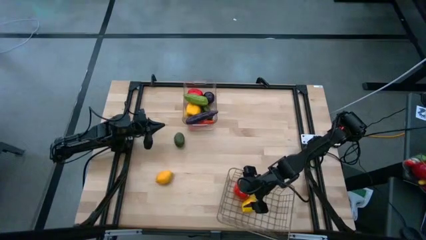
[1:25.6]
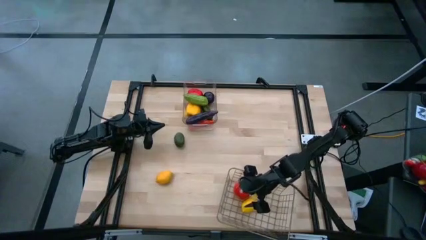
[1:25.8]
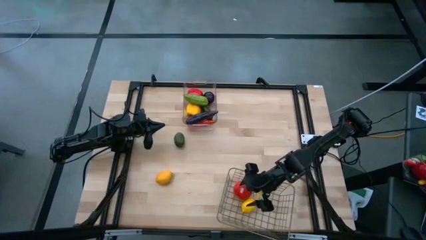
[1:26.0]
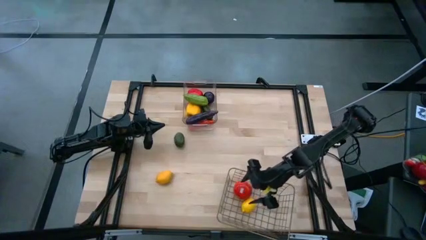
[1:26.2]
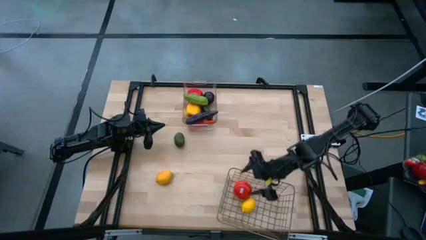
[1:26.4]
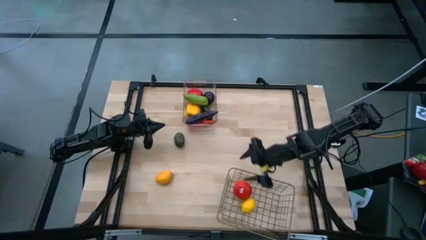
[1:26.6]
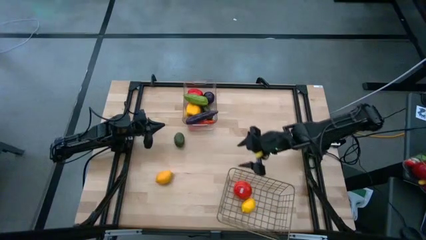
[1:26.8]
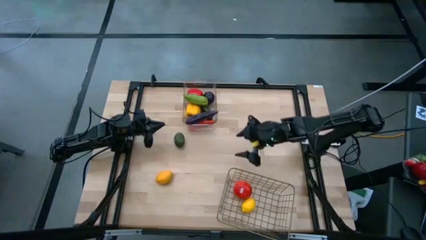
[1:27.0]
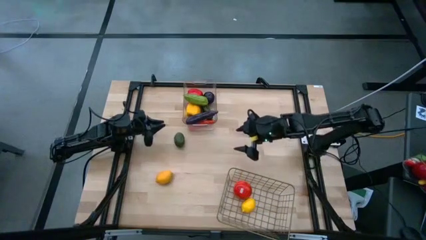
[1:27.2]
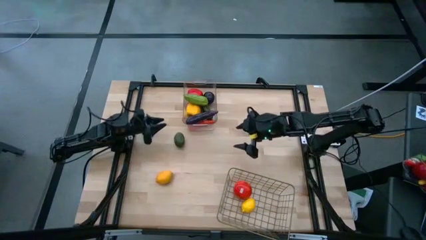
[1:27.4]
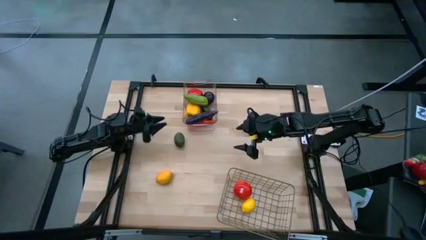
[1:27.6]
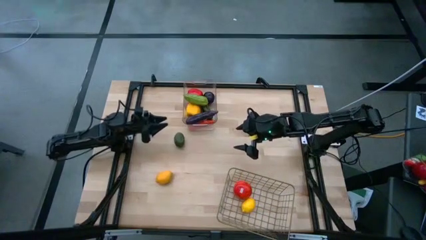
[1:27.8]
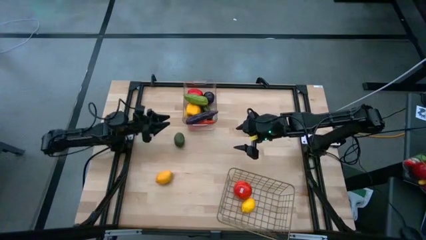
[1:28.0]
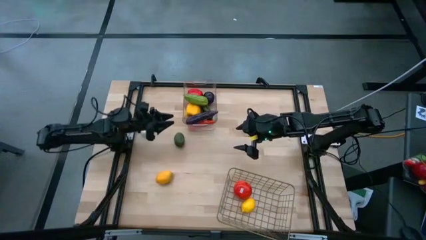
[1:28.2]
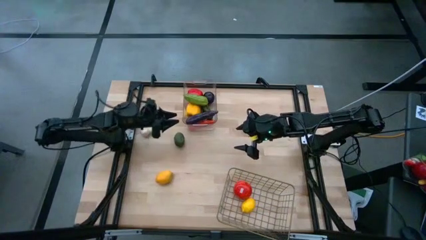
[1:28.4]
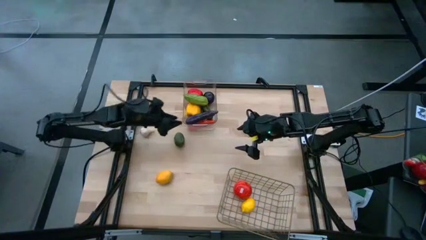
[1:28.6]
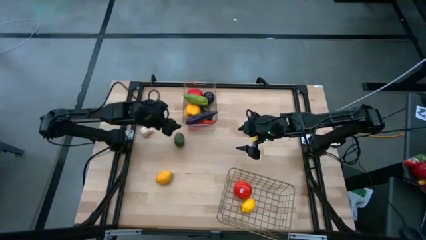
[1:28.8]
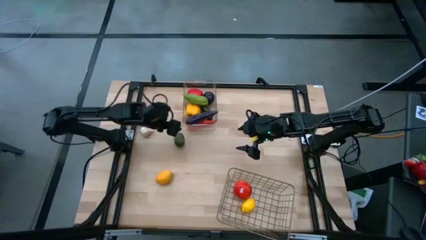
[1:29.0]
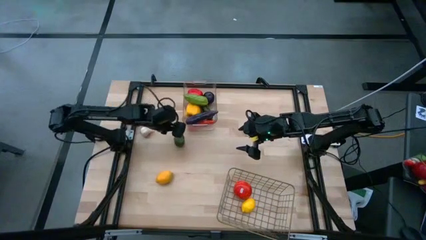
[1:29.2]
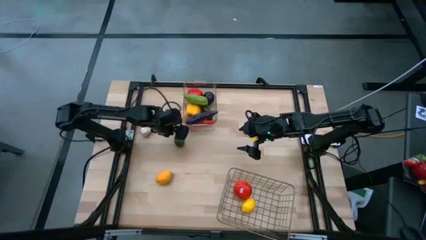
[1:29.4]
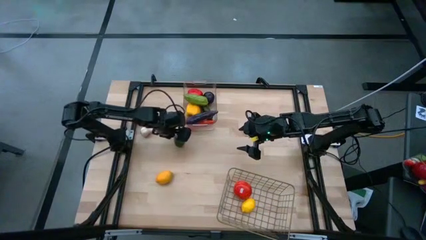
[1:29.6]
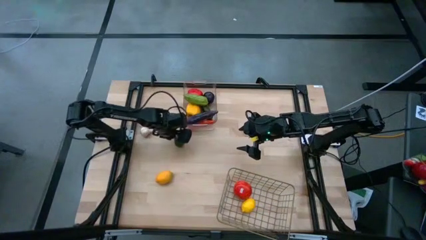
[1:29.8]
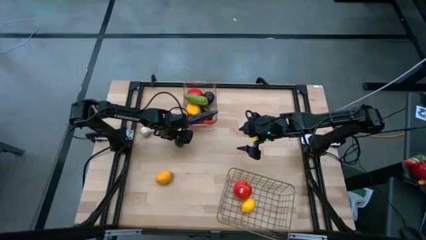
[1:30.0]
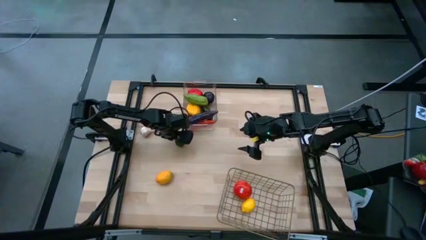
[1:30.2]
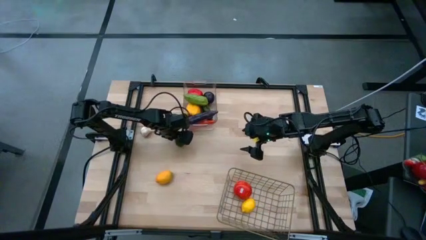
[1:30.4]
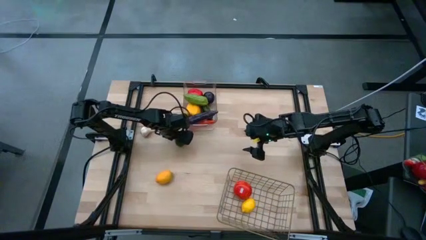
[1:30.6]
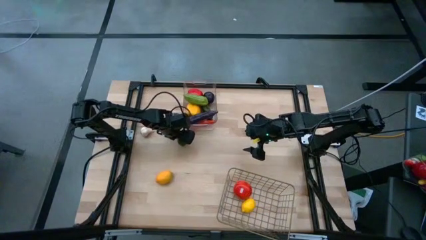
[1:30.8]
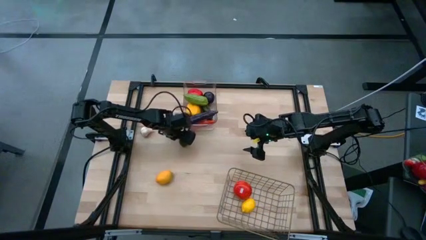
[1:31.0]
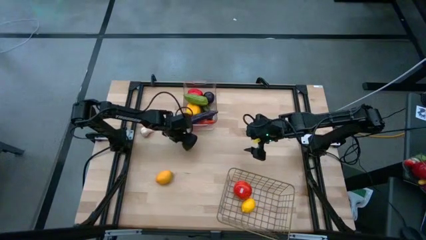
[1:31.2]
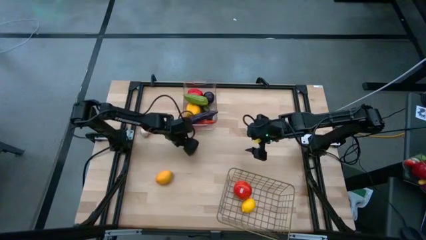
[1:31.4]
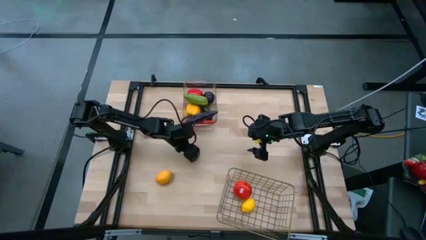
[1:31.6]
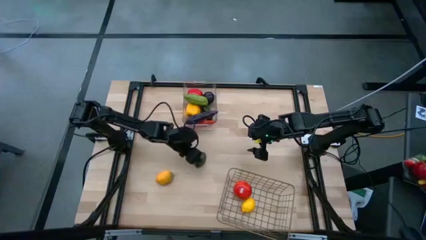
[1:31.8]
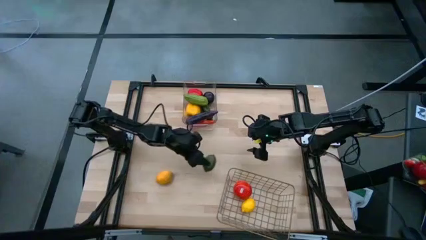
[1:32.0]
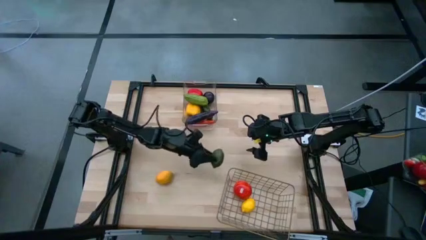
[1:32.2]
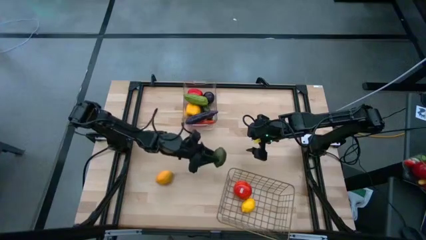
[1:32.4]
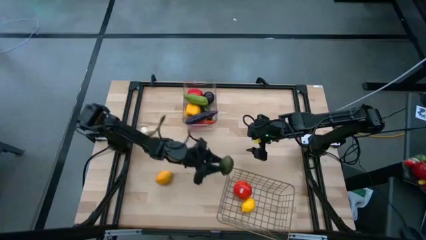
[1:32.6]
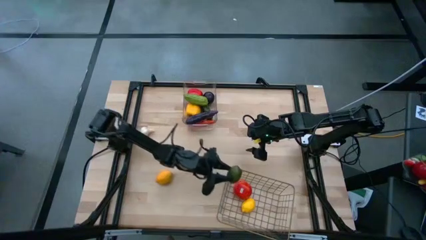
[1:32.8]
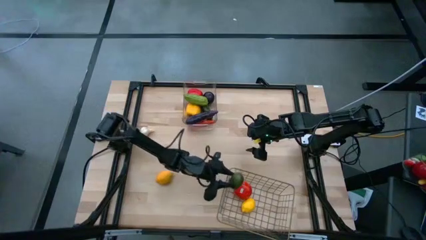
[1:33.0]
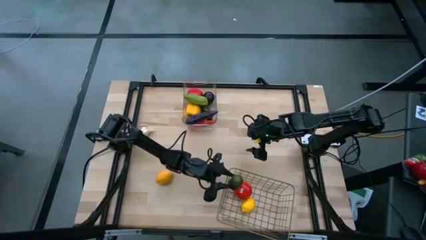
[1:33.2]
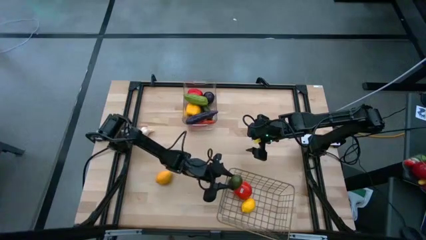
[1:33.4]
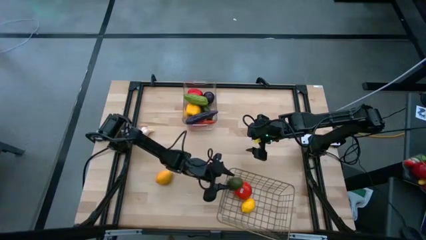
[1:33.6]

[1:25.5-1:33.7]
Task: Sort produce into baskets
Put the green lime into the gold wire basket

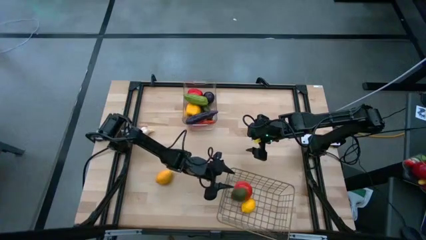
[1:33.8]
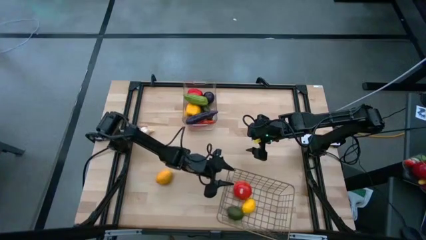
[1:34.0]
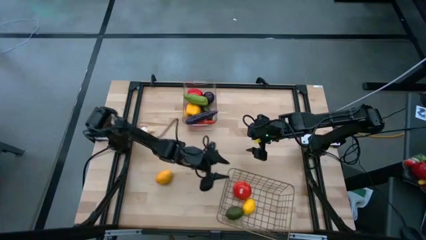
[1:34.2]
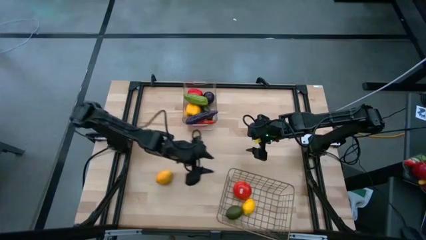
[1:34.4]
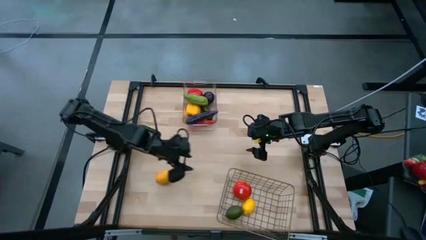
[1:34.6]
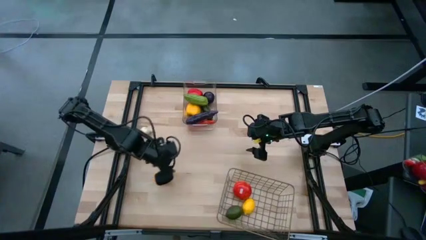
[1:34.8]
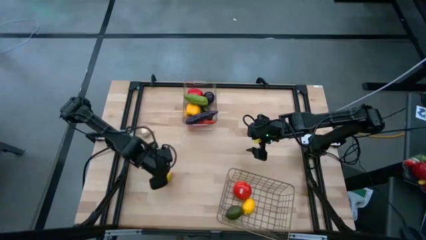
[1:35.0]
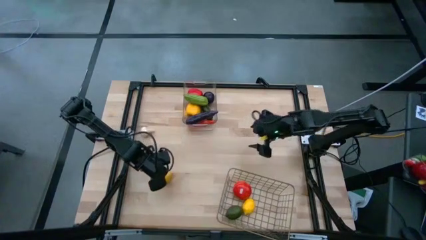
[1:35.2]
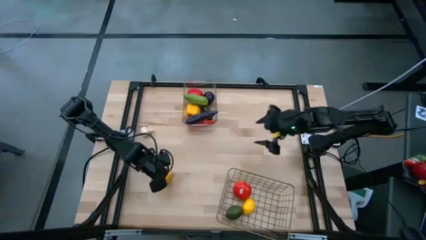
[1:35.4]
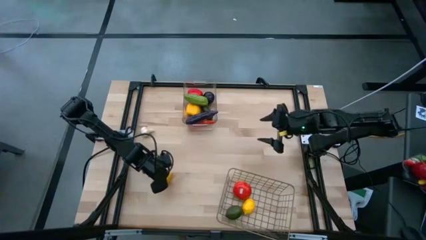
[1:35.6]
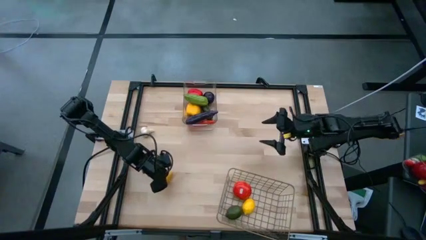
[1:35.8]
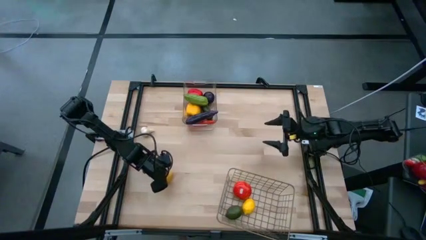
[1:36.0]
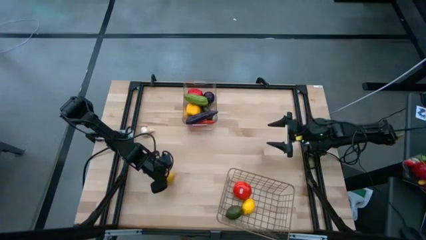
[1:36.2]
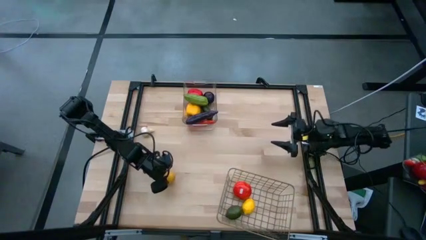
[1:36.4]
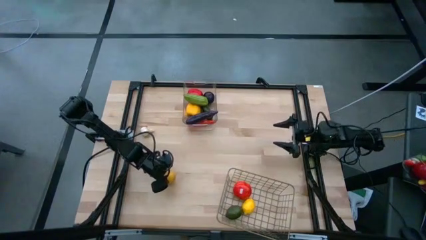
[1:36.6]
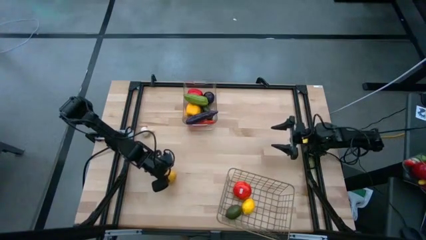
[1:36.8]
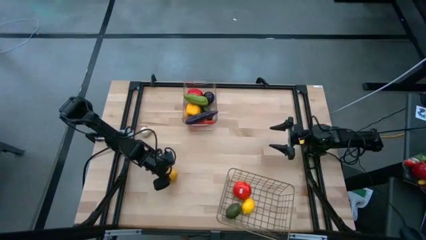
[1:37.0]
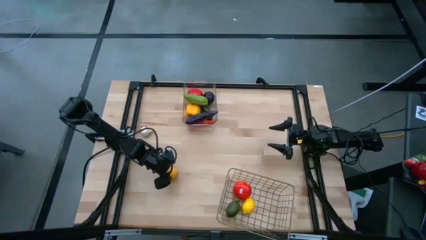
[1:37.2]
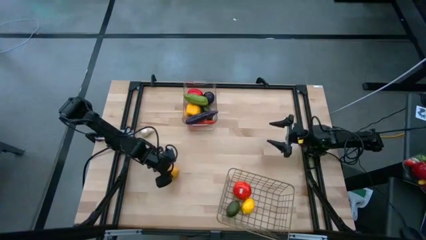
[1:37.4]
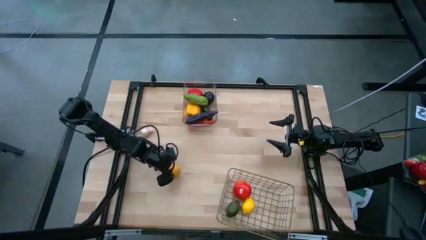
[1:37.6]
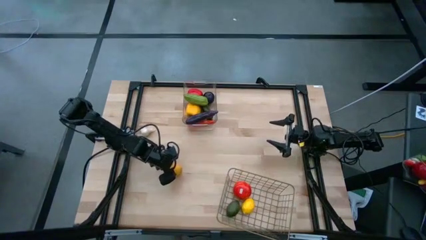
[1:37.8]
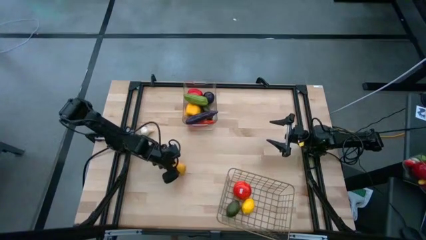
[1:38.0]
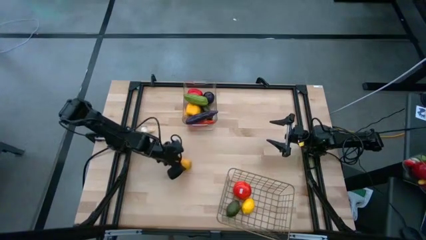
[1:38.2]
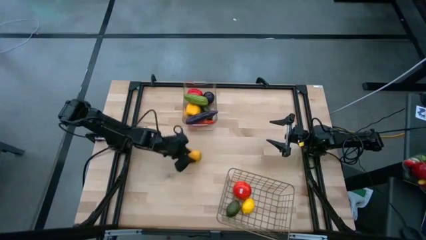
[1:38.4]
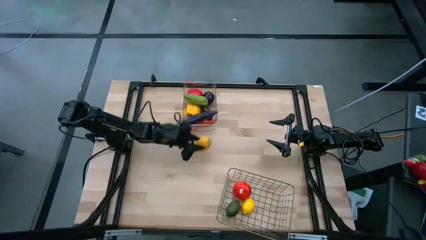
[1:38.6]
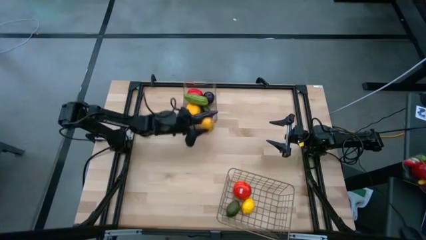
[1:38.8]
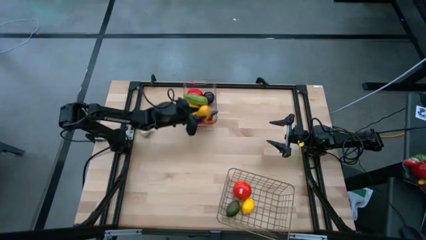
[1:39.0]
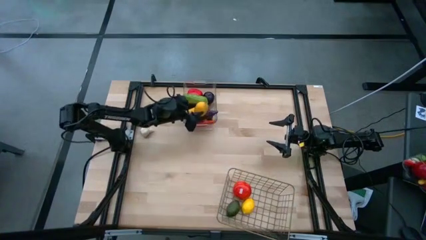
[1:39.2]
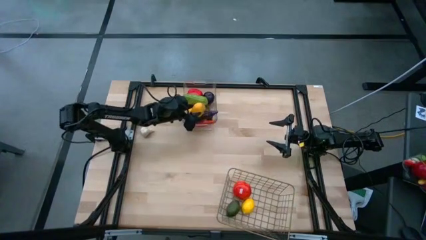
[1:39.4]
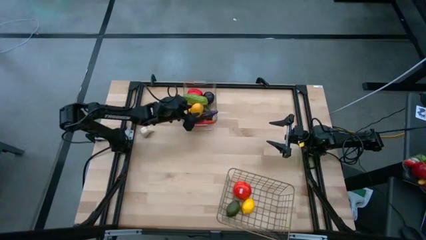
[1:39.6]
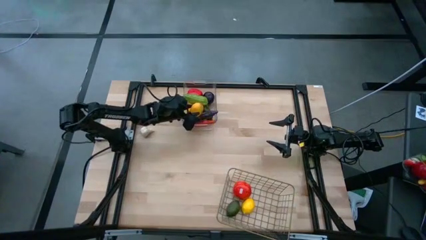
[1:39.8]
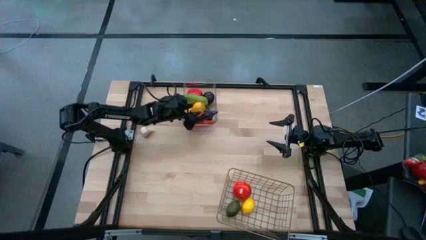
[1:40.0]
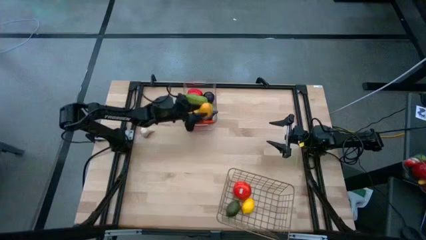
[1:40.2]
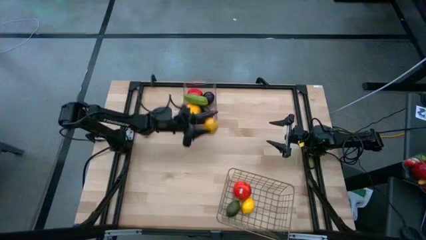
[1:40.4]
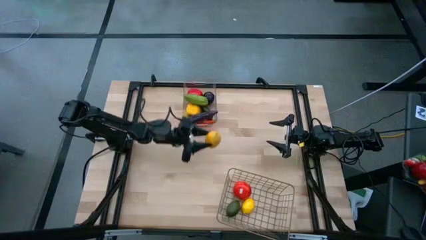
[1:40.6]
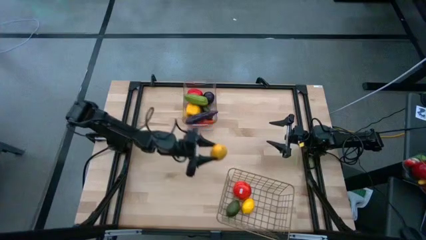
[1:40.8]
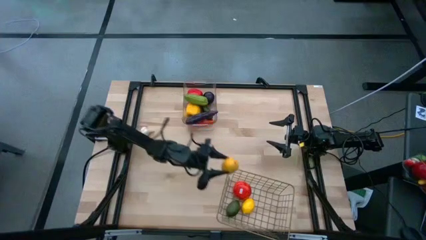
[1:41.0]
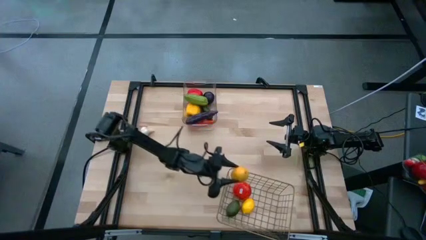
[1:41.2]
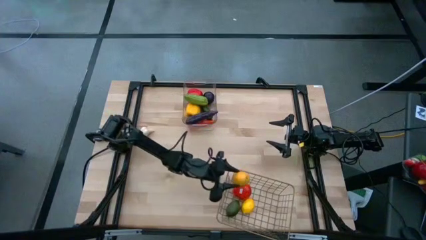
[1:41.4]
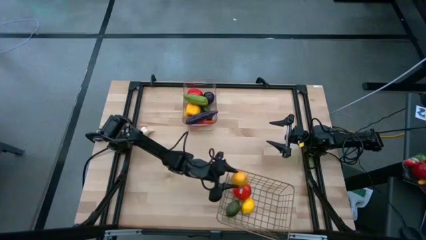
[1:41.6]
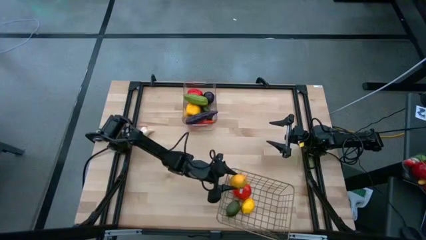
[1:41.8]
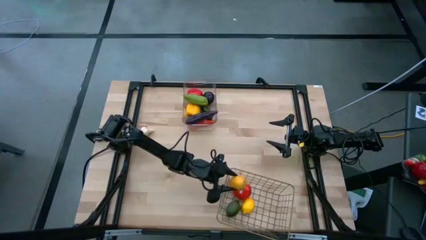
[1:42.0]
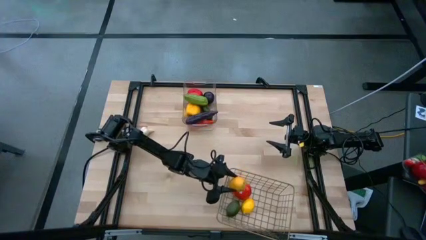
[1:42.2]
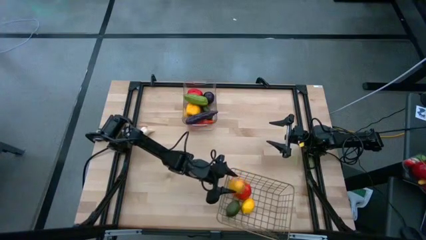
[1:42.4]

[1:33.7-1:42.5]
Put the yellow lemon into the gold wire basket
